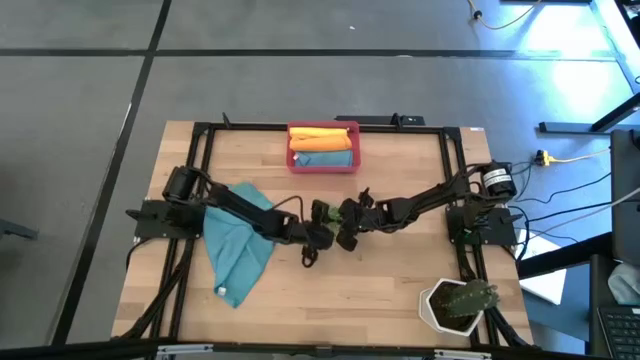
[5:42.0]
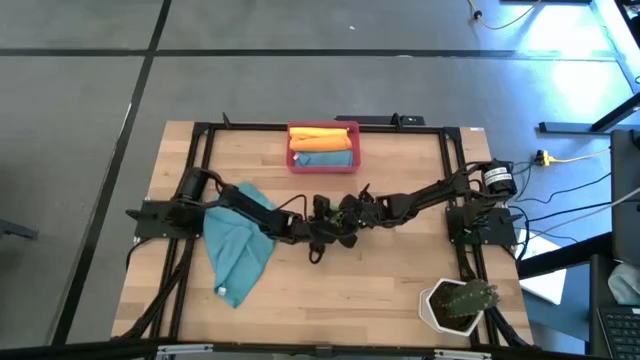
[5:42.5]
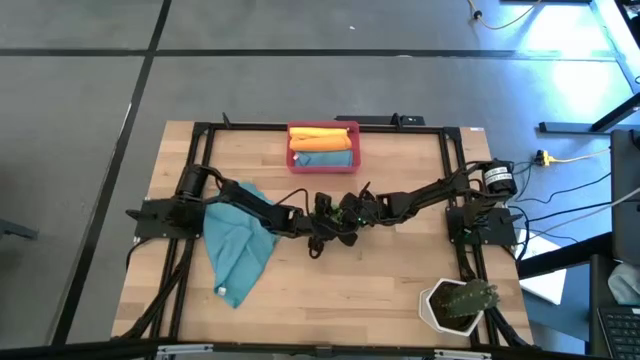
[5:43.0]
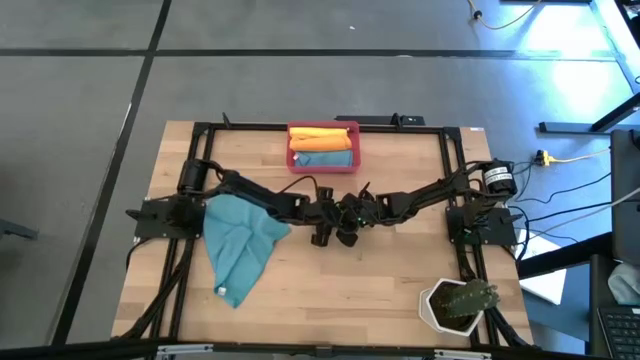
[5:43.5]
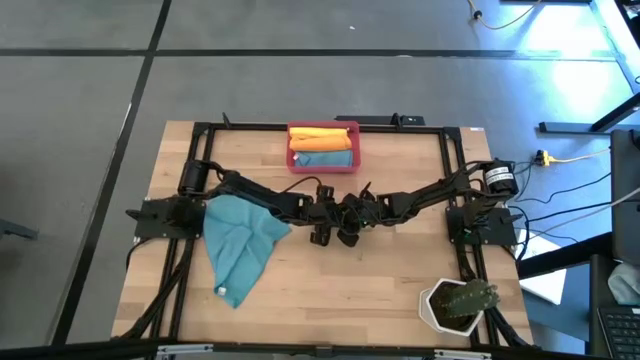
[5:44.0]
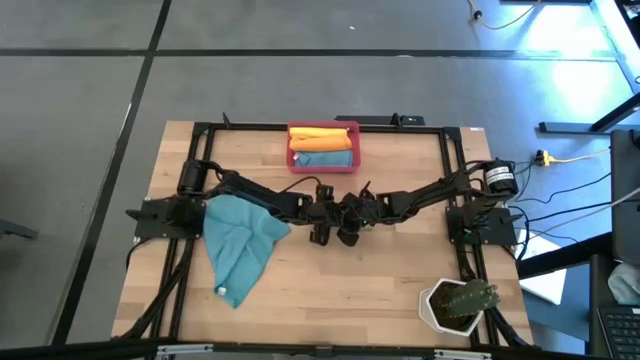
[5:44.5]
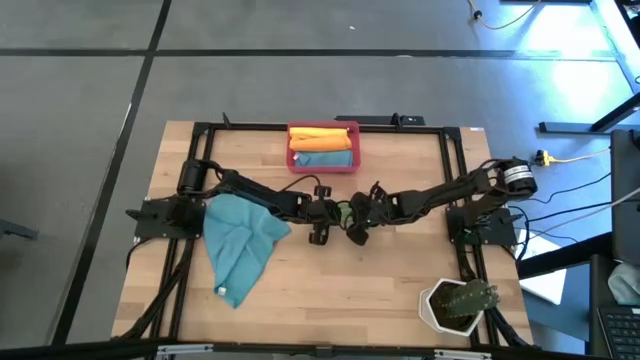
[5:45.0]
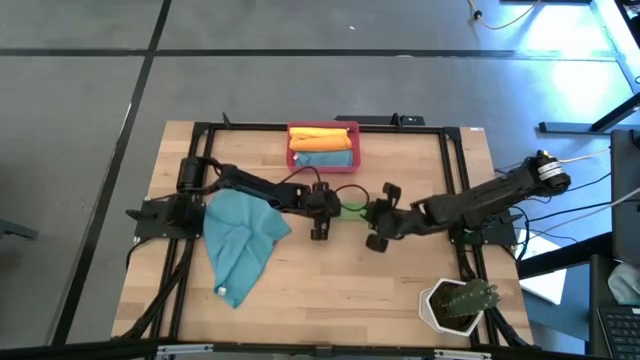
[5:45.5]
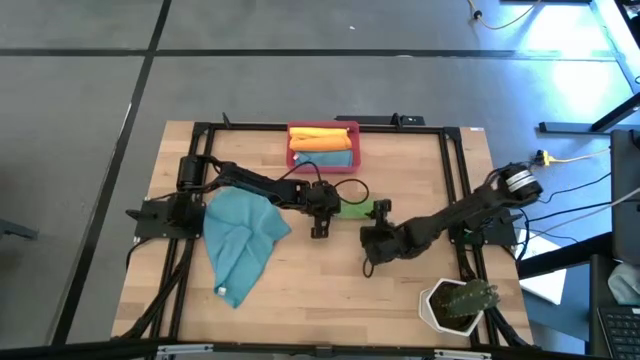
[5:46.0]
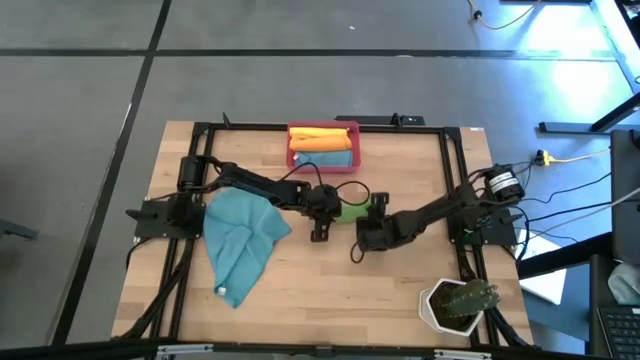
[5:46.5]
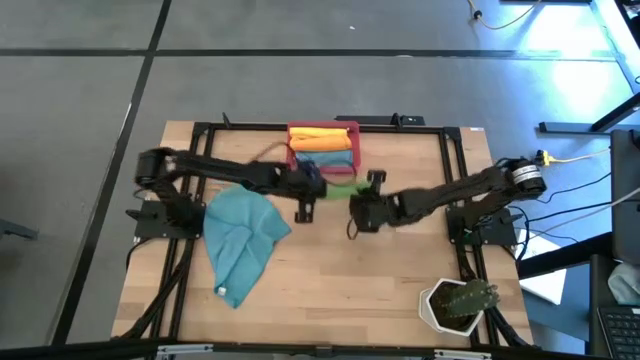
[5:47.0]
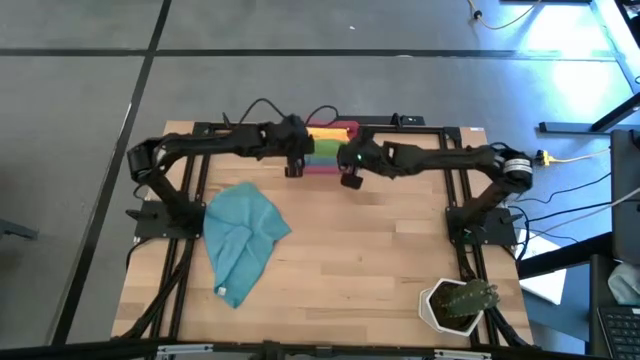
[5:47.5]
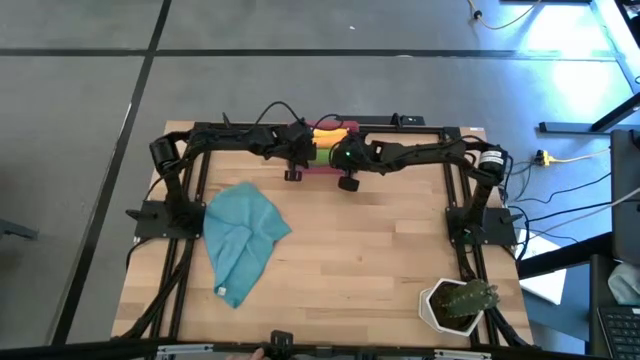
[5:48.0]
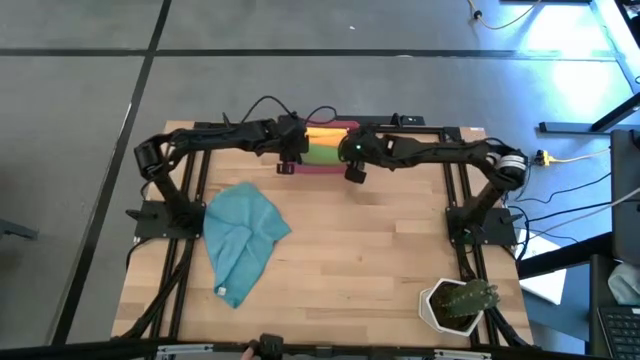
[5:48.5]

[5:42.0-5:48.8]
Task: Roll microfiber towels into tight, uniform cylinder then place into a basket
Put the green microfiber towel into the red bin

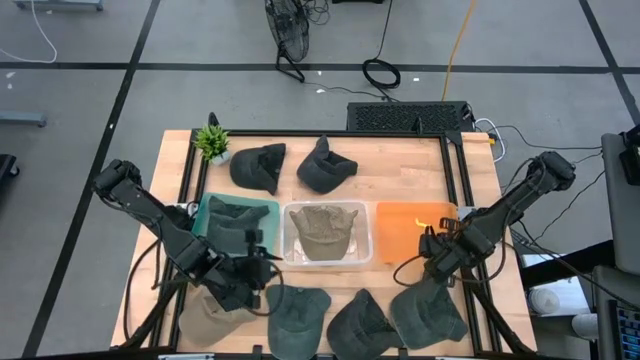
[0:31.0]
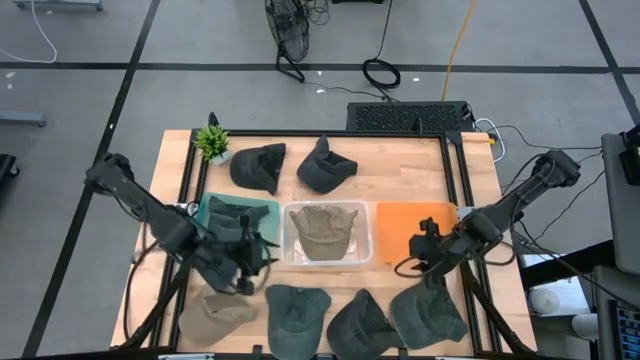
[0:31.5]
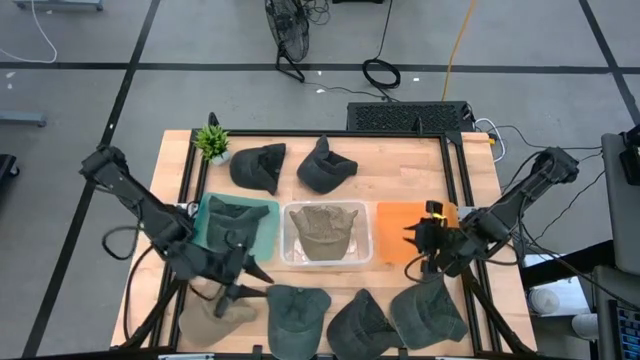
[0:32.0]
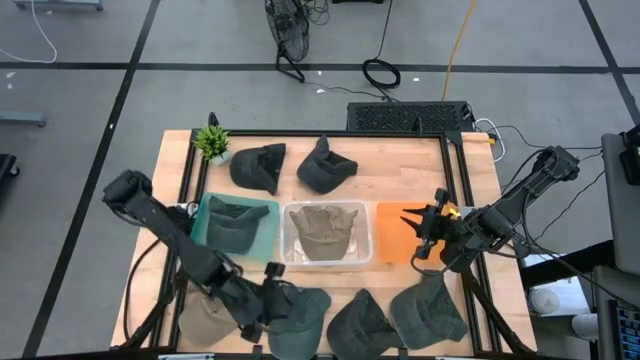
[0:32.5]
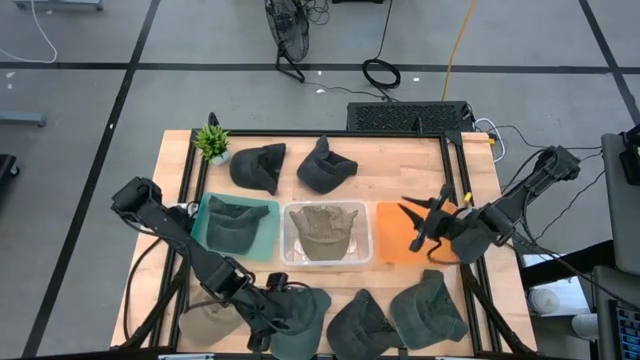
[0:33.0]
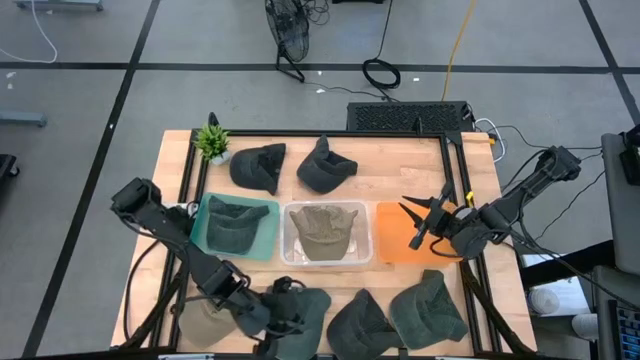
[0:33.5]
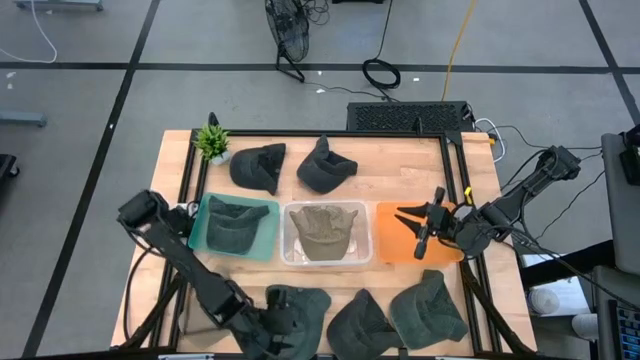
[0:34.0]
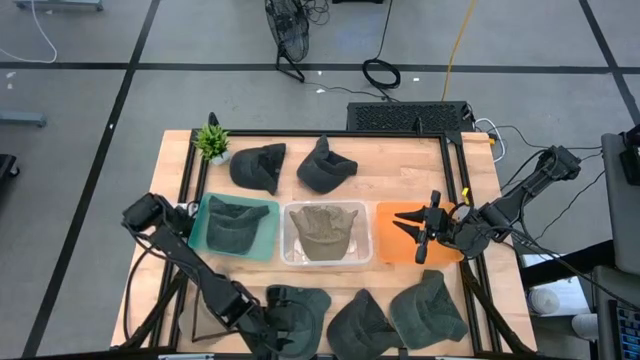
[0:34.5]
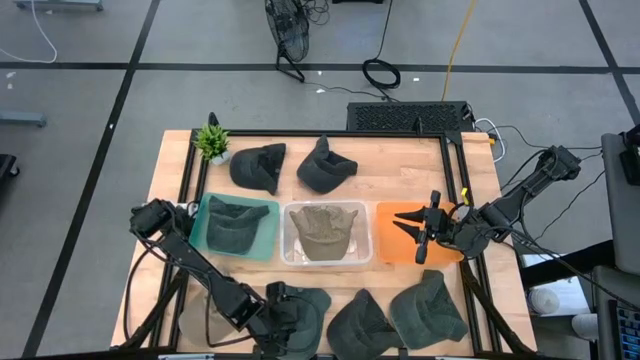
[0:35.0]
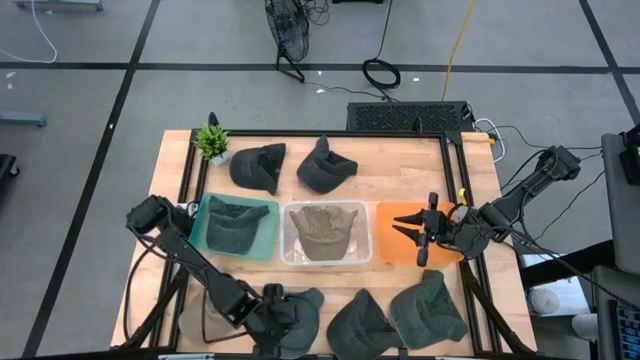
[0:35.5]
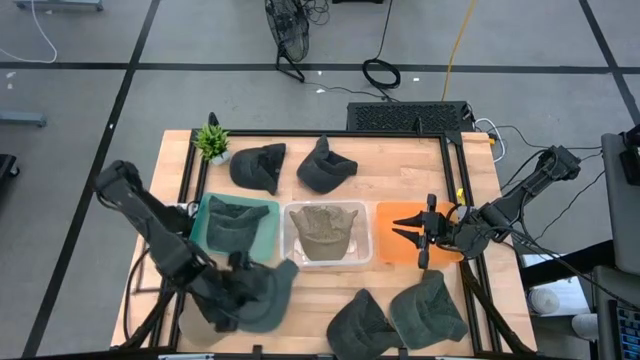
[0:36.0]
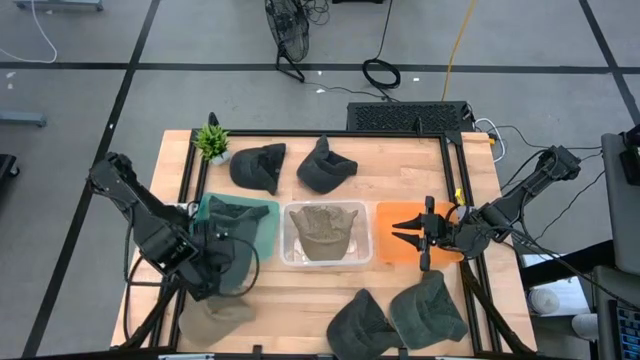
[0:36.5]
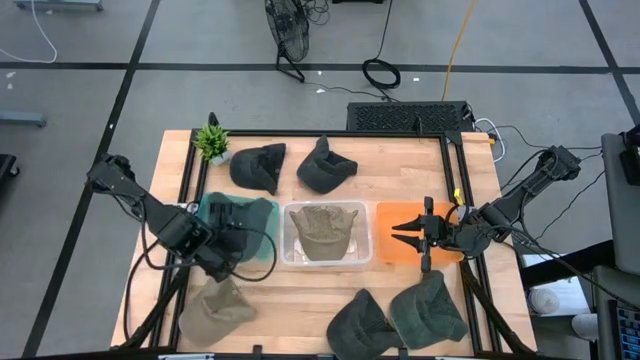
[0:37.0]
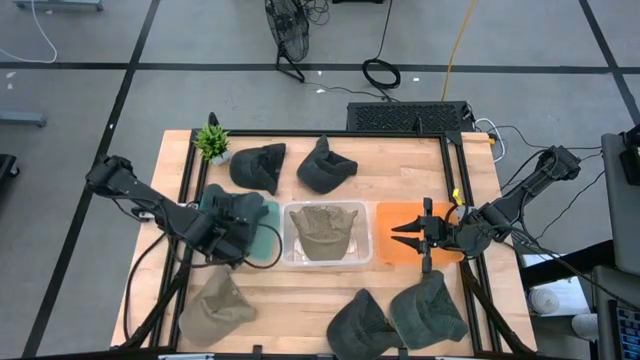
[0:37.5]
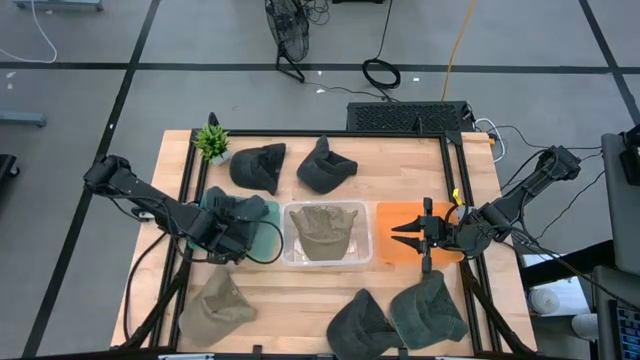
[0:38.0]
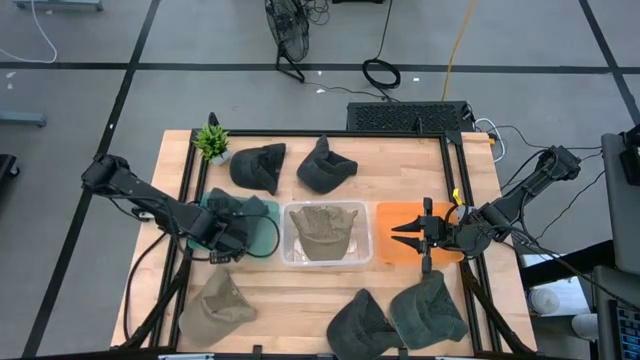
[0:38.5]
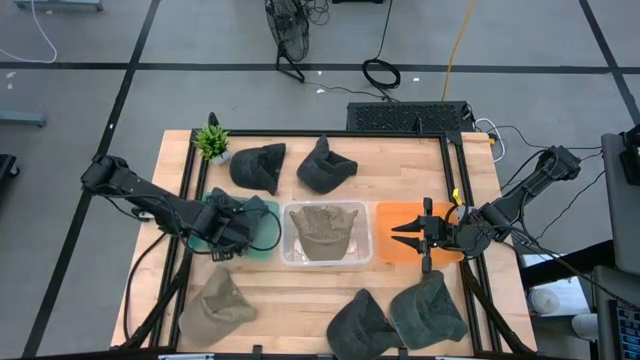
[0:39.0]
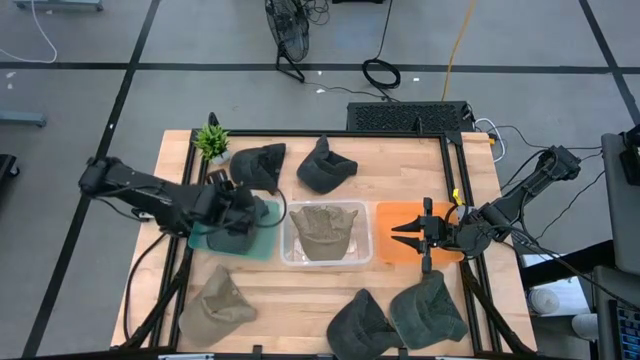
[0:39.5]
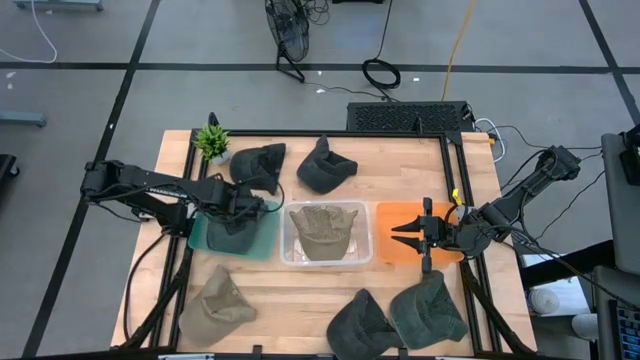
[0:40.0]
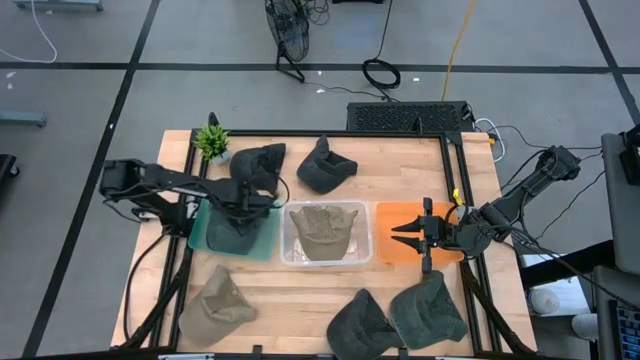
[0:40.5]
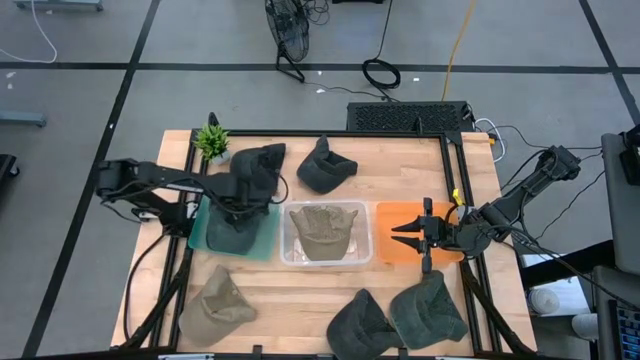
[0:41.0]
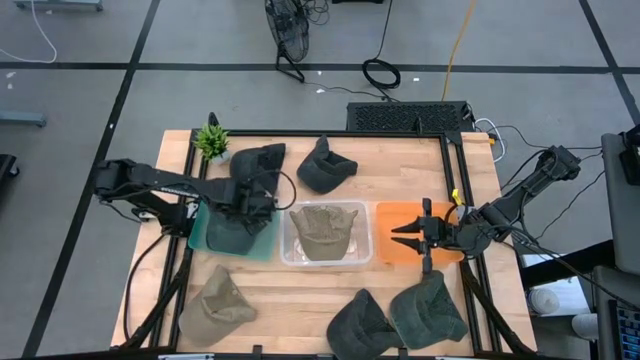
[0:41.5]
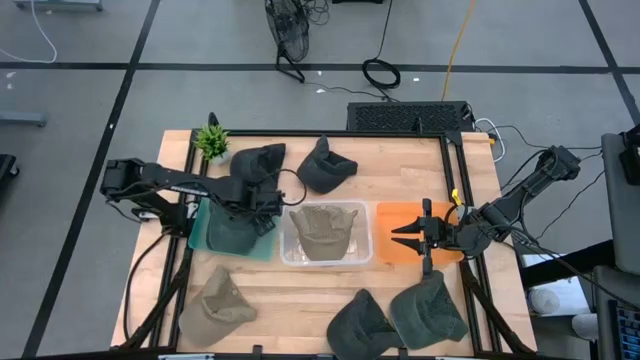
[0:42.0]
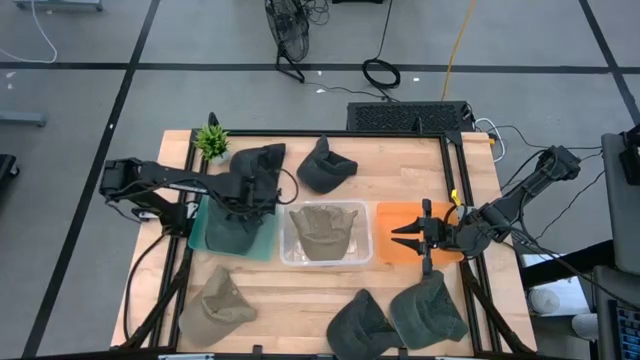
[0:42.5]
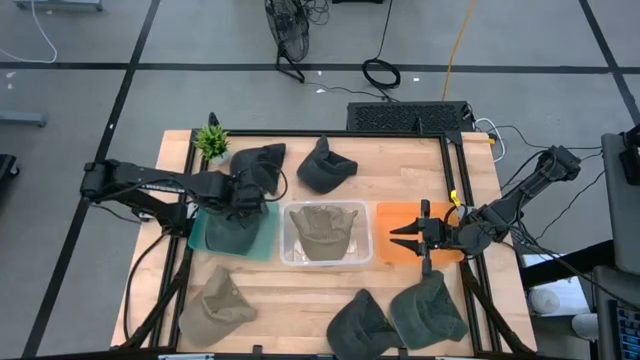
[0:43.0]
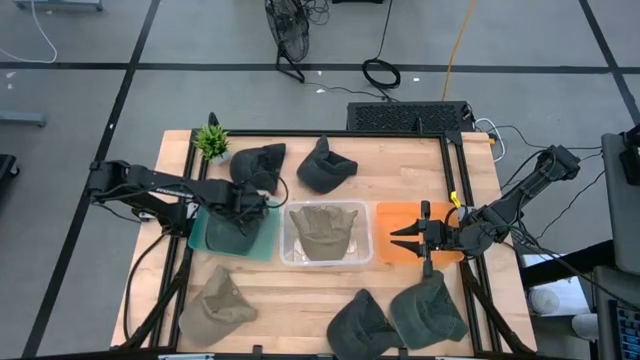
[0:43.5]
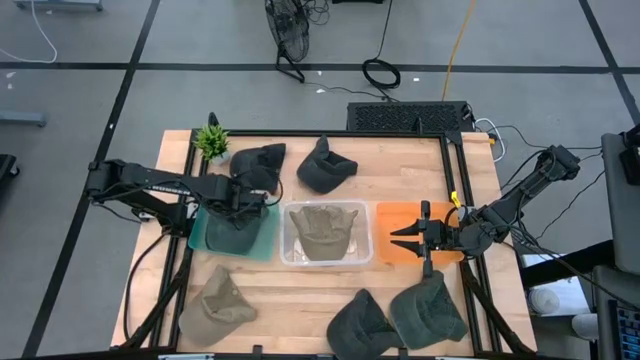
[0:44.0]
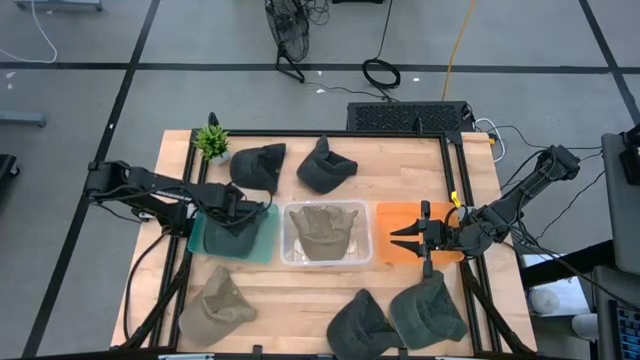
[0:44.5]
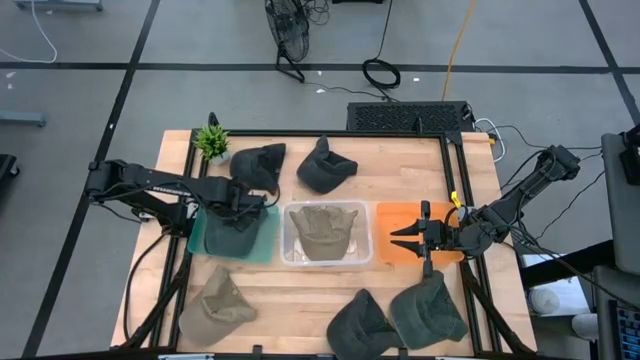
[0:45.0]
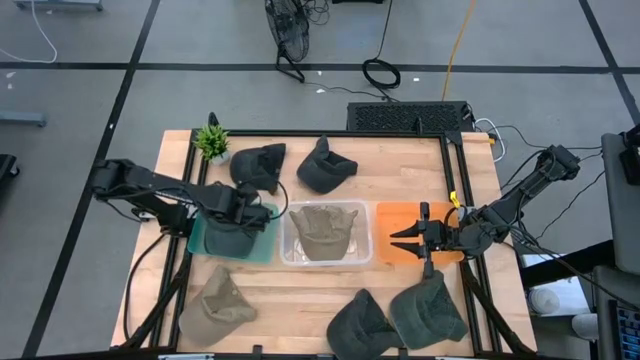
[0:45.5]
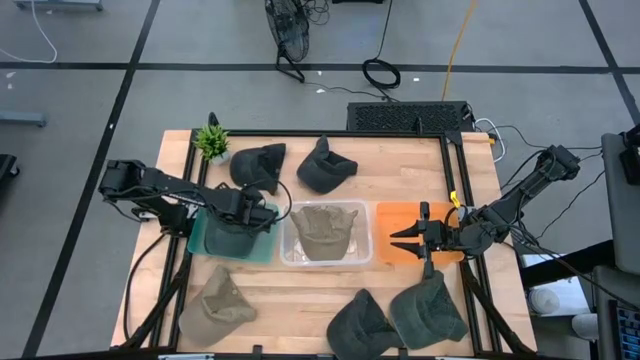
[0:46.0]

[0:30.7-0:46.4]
Task: Pick & Place hat
Put the left green cap into the green bin
